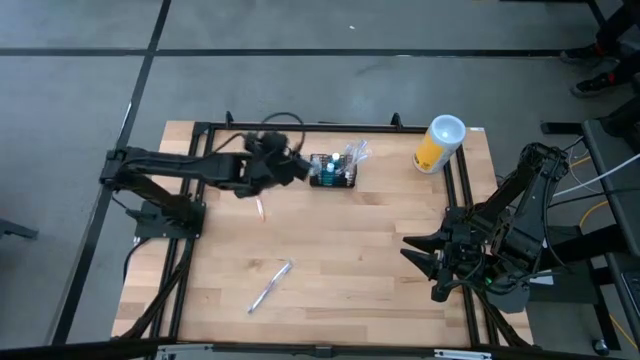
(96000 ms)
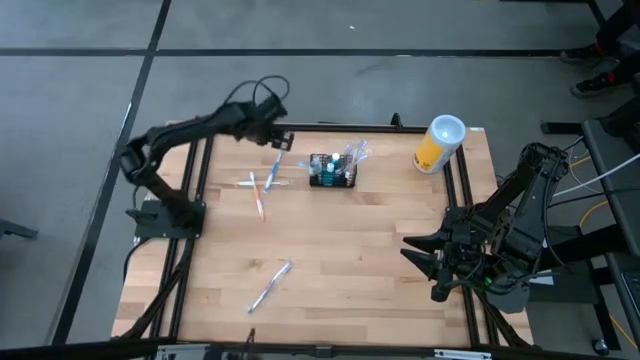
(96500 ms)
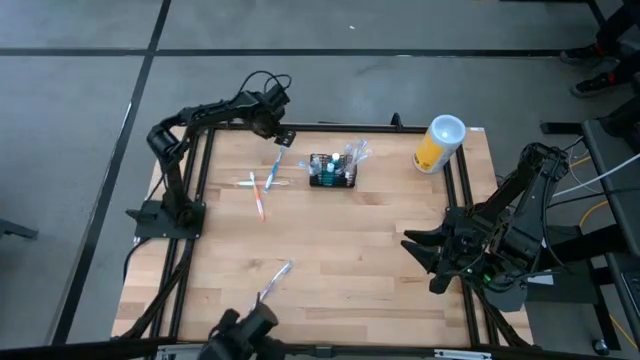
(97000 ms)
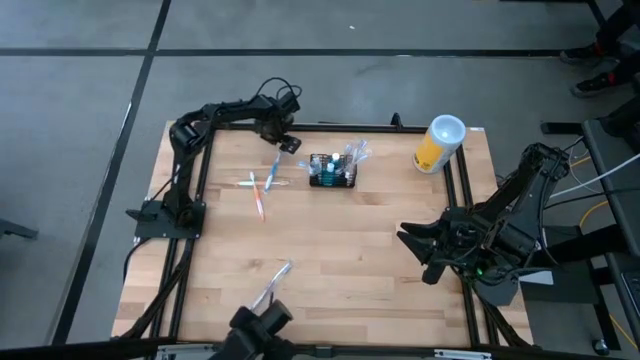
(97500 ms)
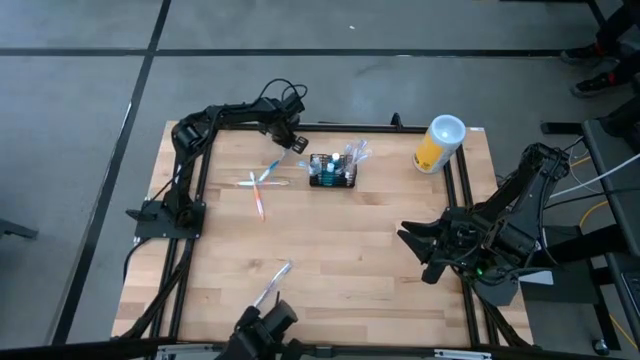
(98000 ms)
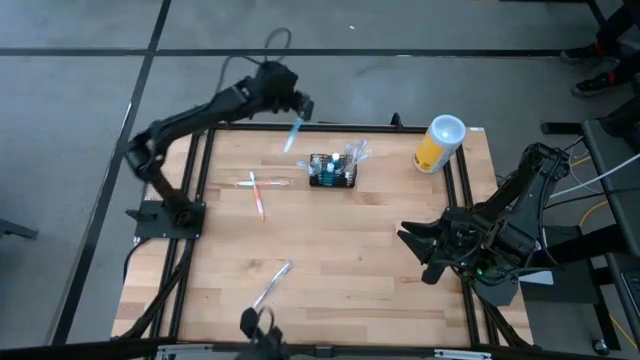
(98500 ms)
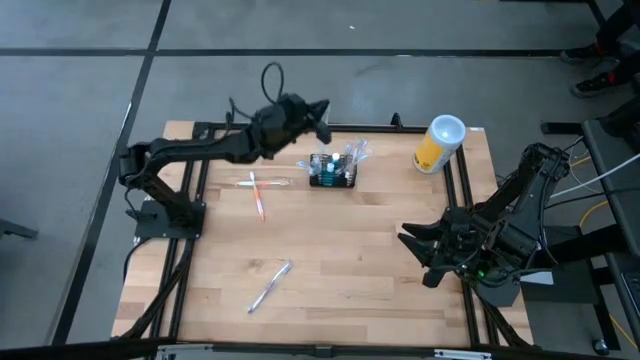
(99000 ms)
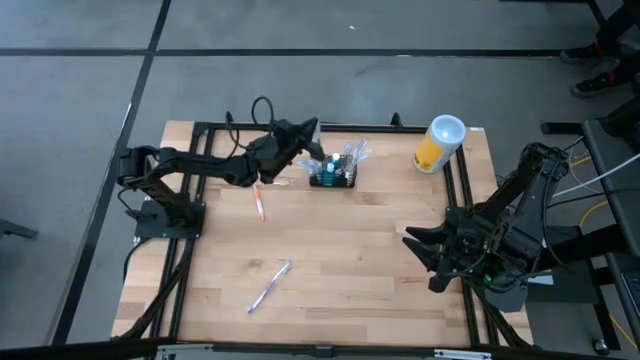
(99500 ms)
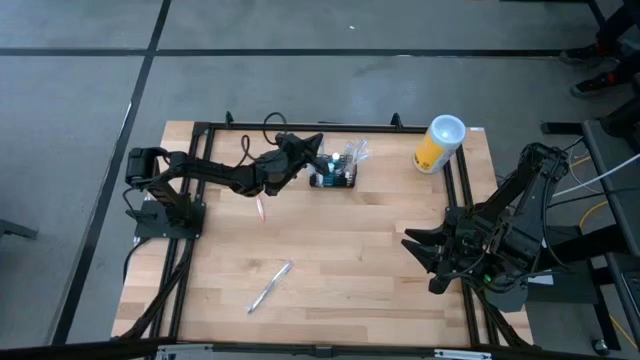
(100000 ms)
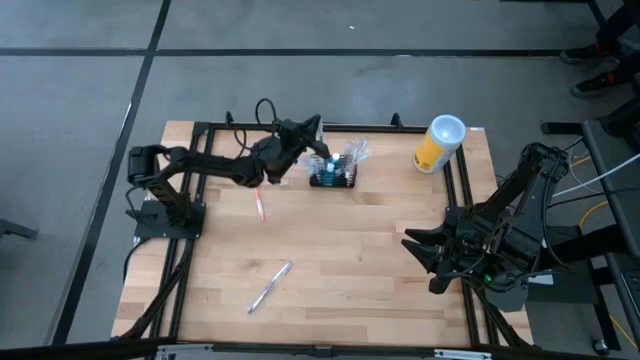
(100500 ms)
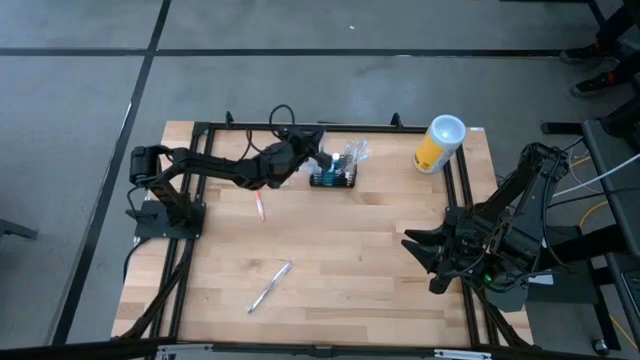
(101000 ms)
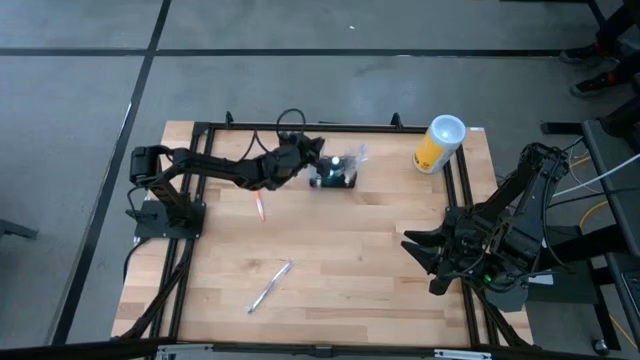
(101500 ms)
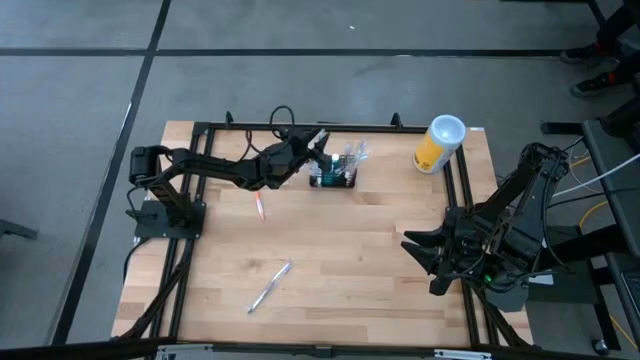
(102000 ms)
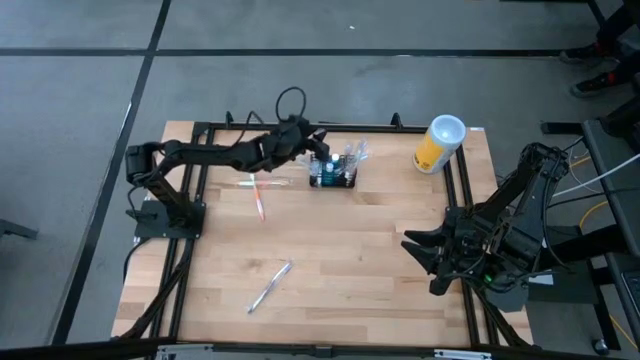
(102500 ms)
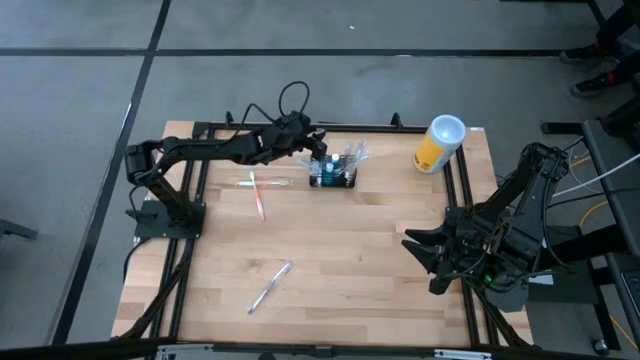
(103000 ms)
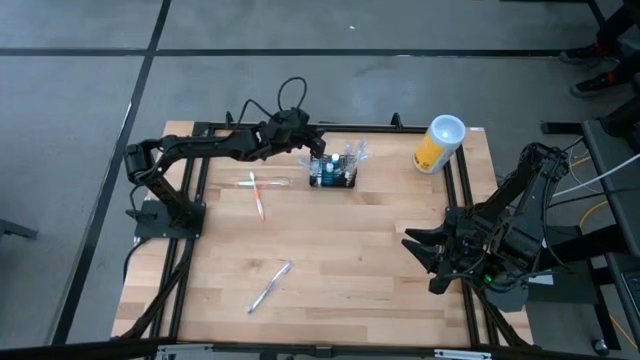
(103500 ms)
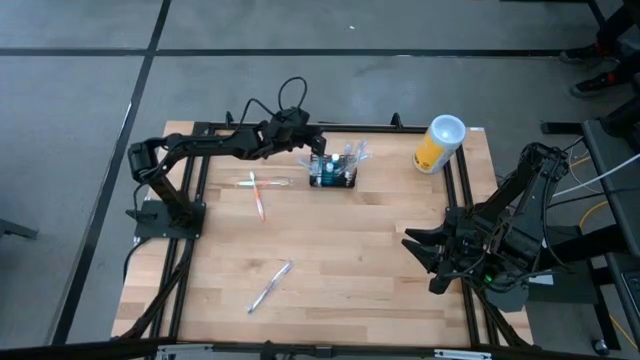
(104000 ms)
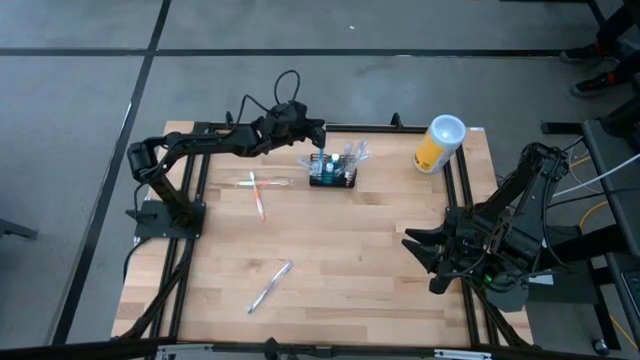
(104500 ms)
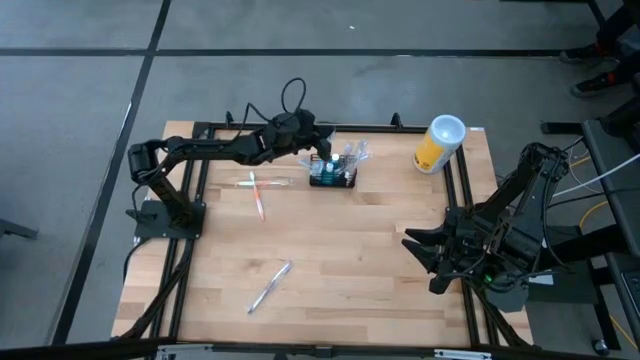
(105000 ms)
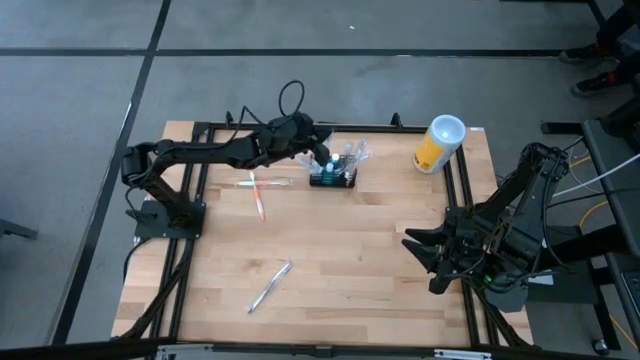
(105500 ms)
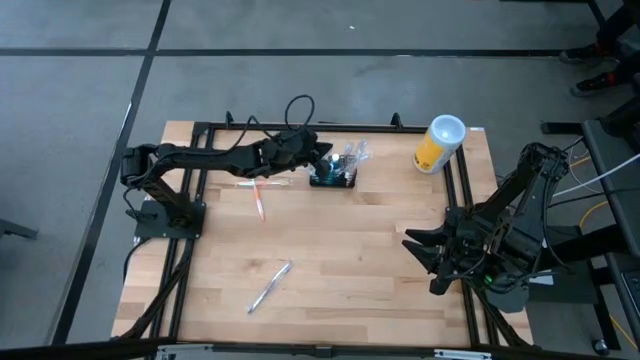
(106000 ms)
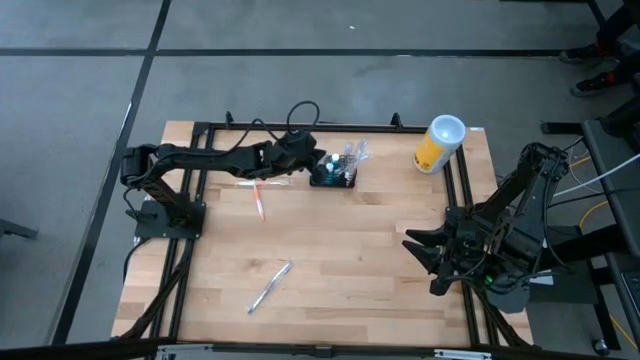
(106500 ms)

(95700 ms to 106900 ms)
Task: Pick & Place toothbrushing station
Put the blue toothbrush into the black mesh organizer

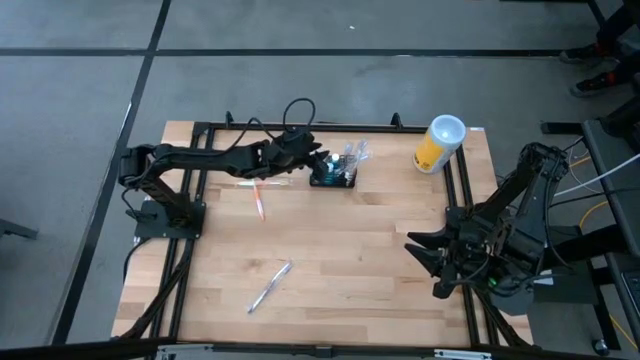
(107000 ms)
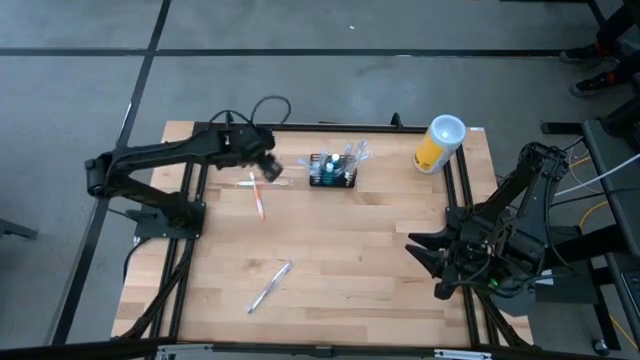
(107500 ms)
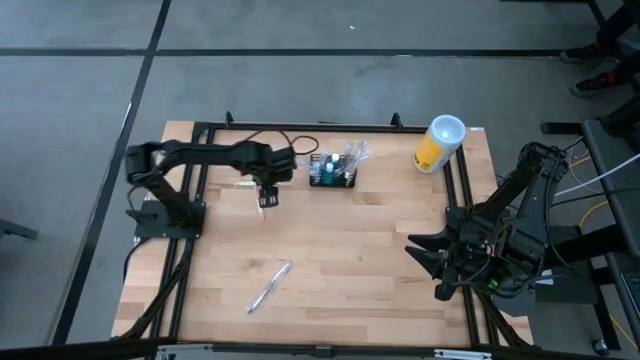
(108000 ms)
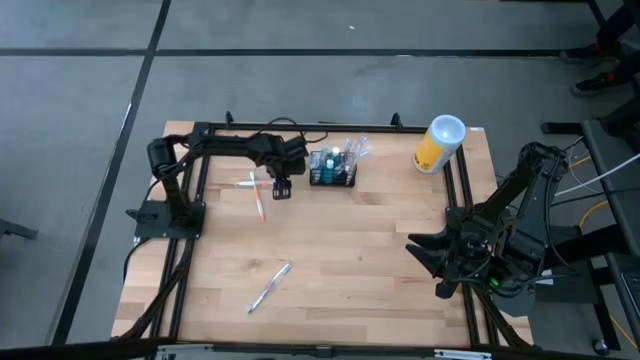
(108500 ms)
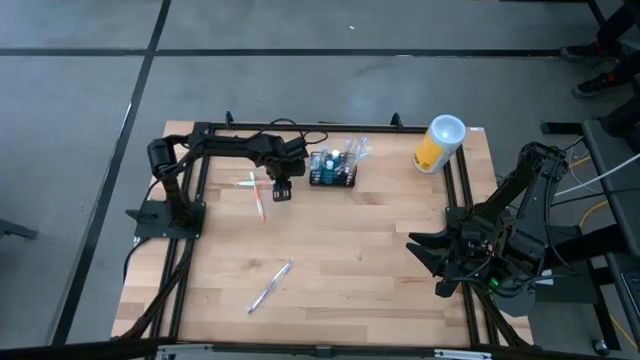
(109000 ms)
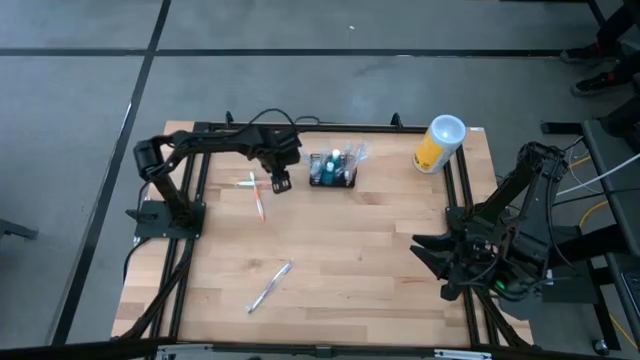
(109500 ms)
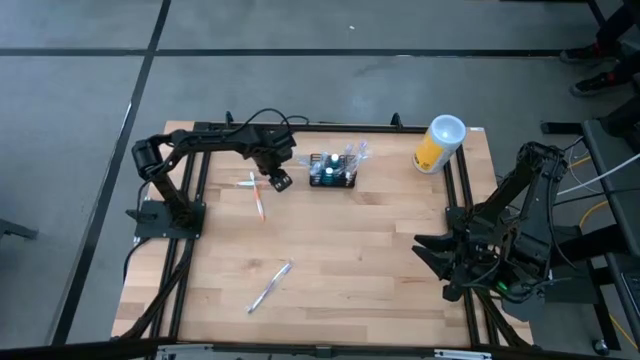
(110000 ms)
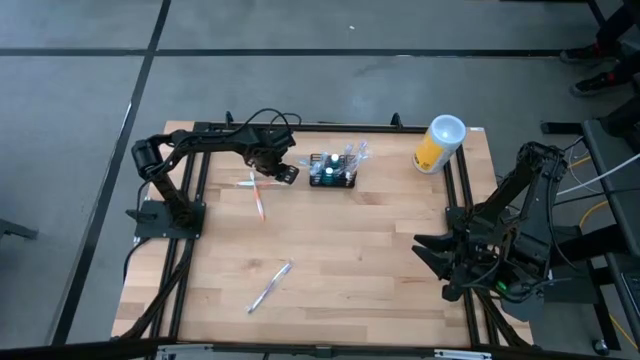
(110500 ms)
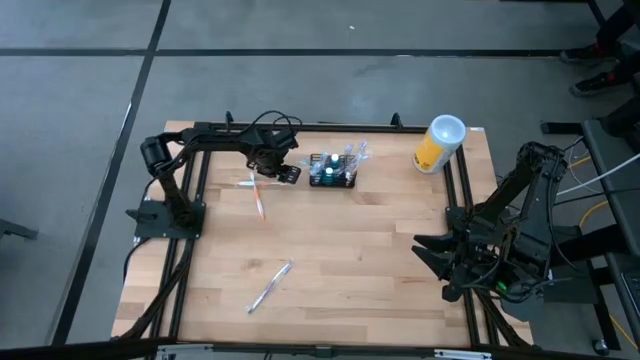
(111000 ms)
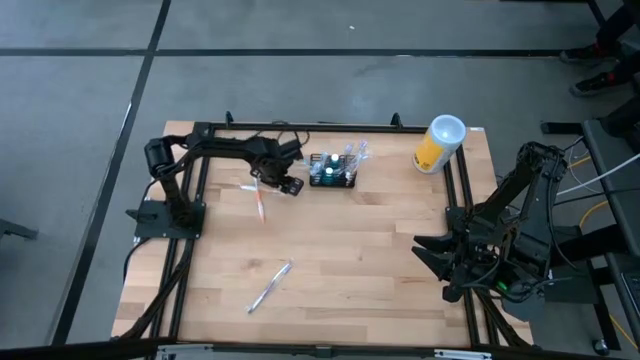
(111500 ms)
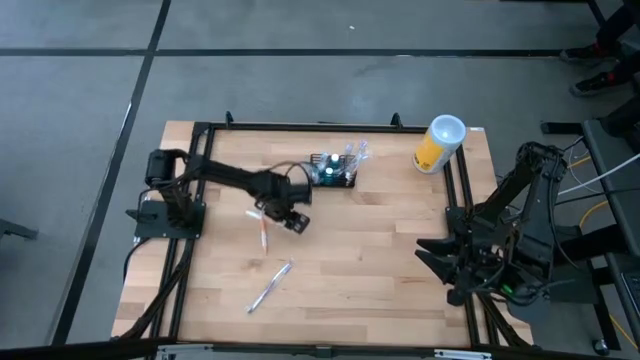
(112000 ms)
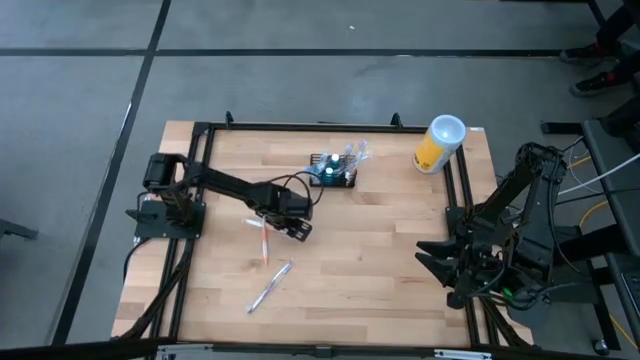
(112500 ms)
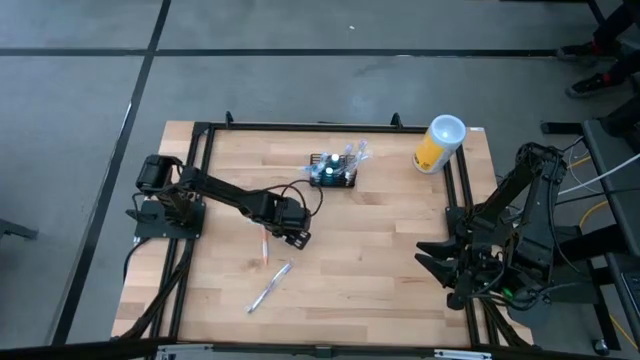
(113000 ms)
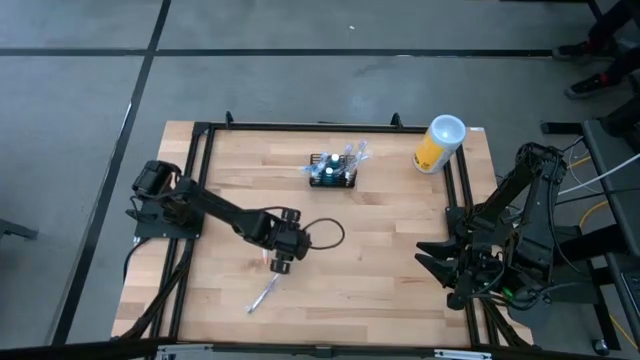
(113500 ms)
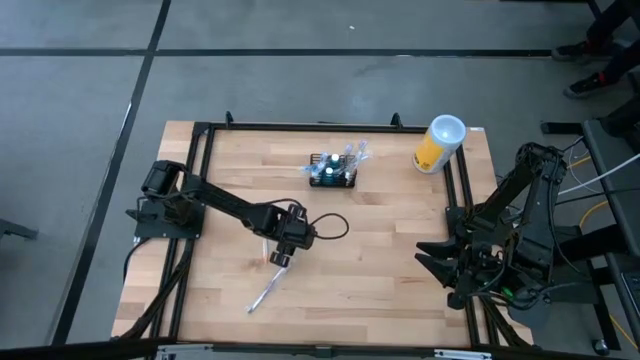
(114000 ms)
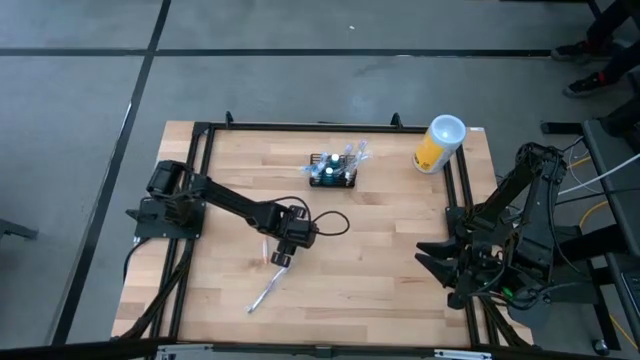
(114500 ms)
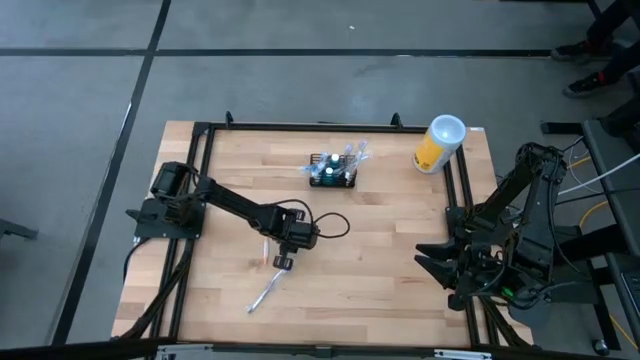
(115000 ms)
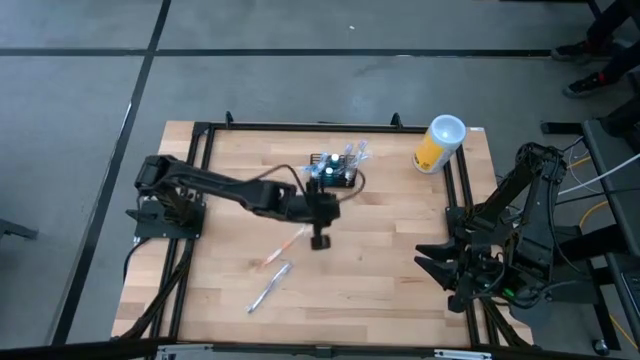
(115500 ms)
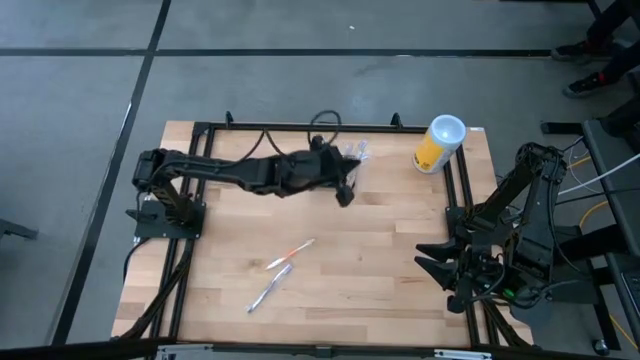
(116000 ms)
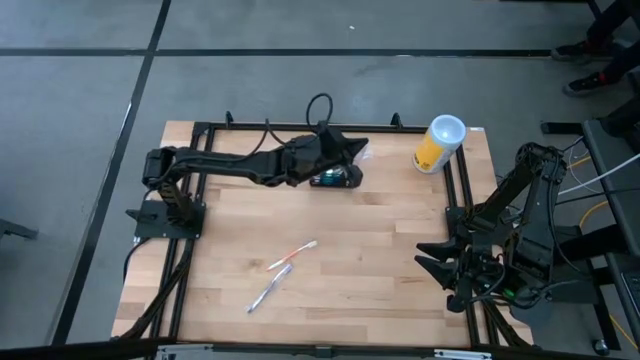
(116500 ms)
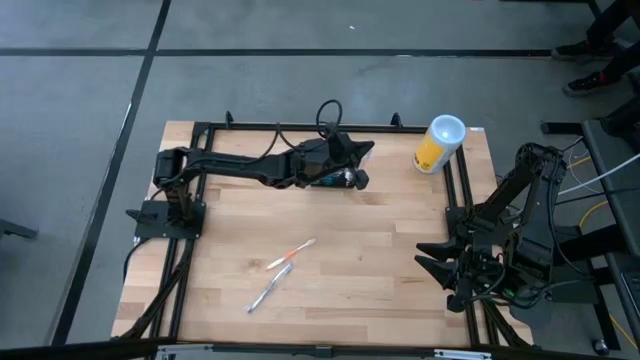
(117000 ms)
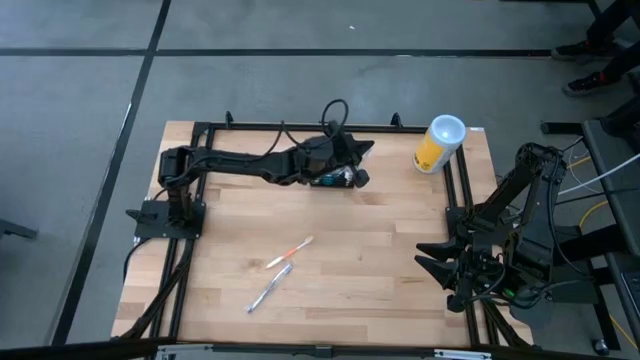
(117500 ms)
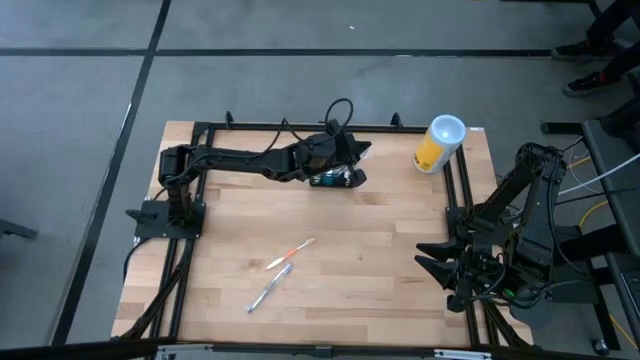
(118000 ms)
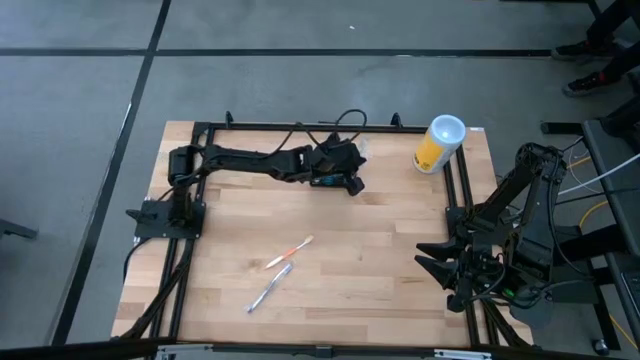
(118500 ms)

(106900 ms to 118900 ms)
Put the orange toothbrush into the black mesh organizer
